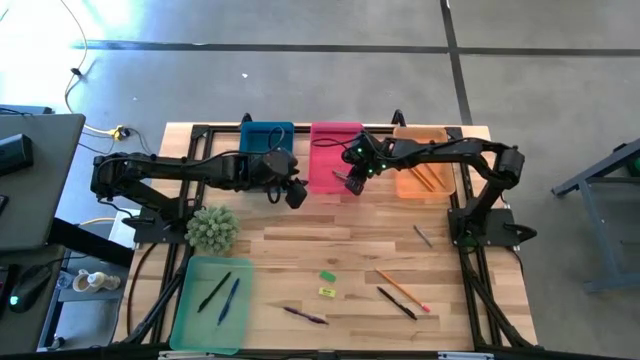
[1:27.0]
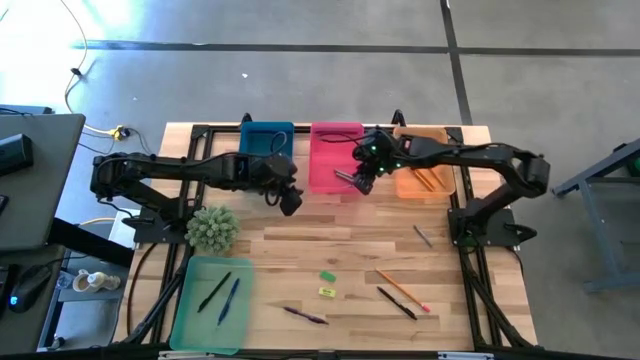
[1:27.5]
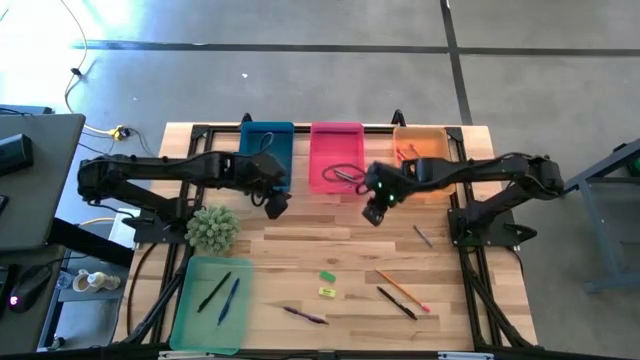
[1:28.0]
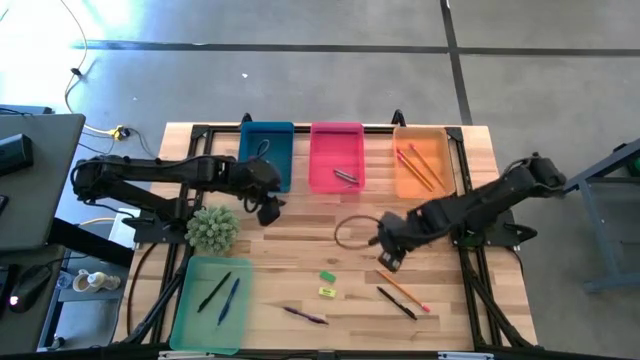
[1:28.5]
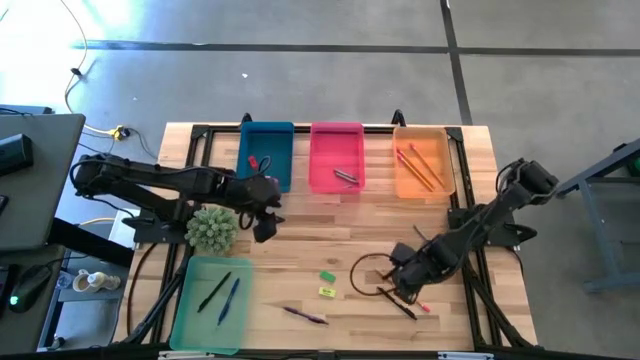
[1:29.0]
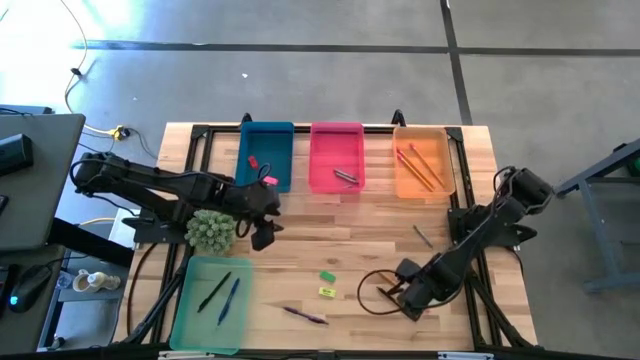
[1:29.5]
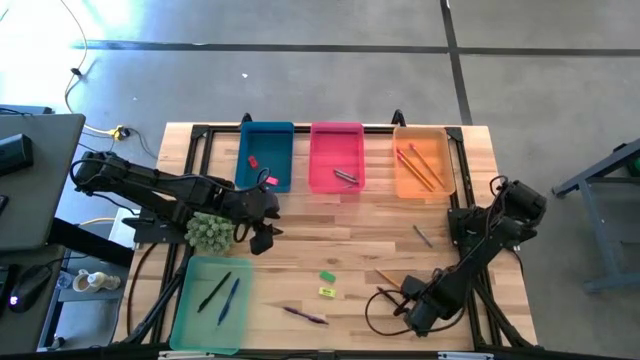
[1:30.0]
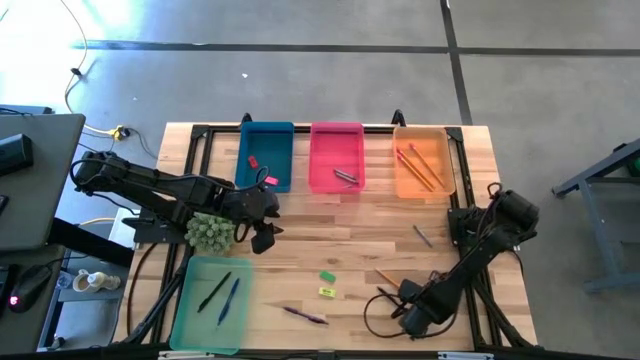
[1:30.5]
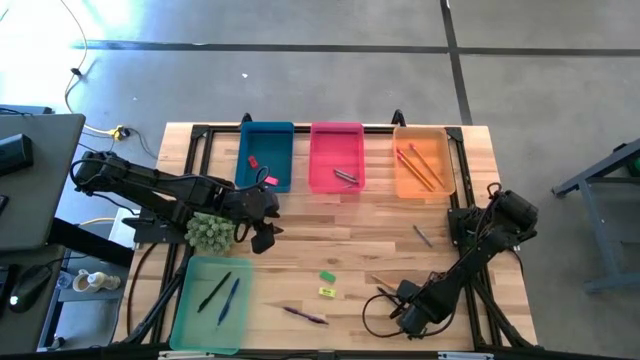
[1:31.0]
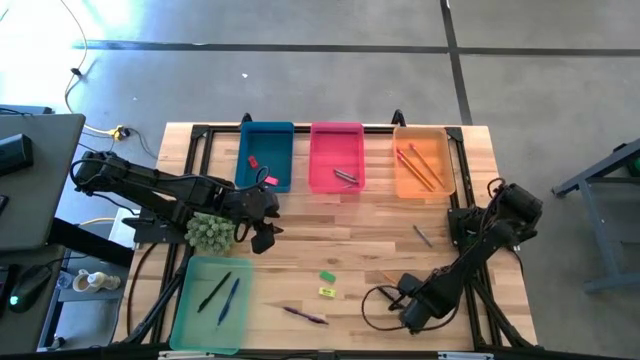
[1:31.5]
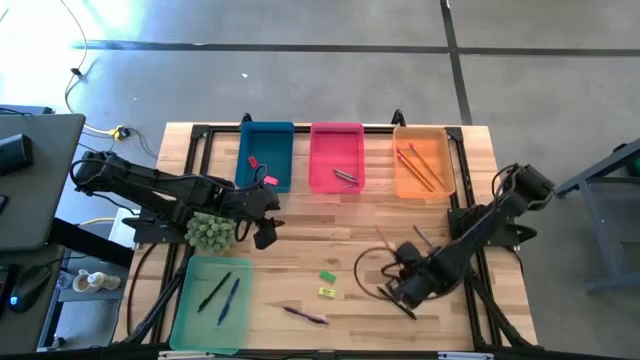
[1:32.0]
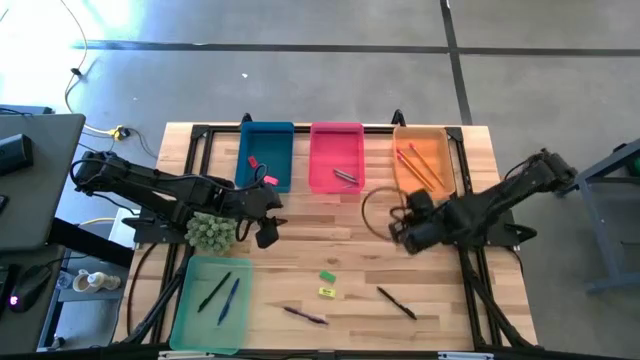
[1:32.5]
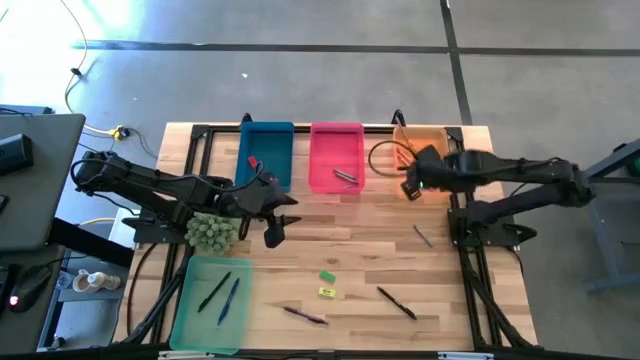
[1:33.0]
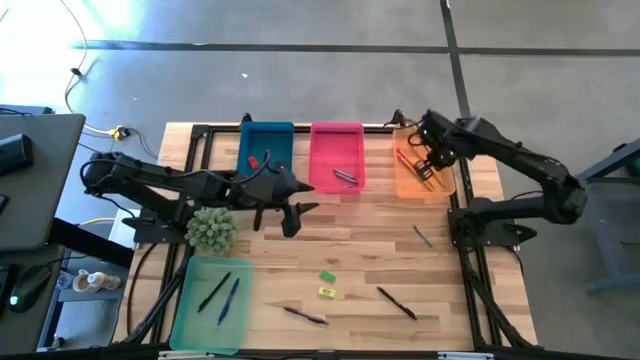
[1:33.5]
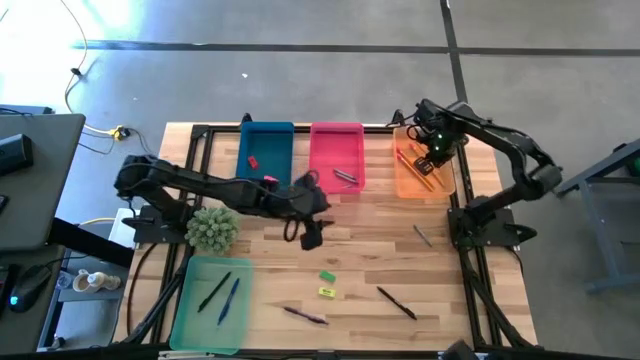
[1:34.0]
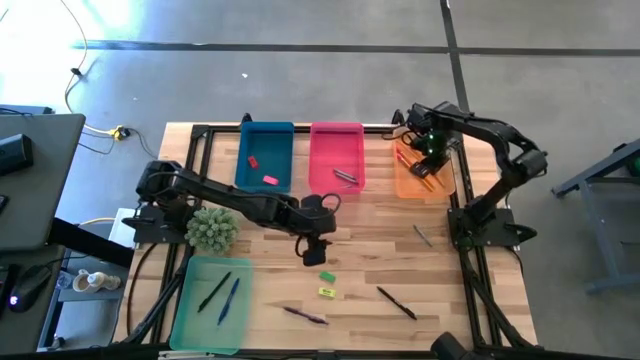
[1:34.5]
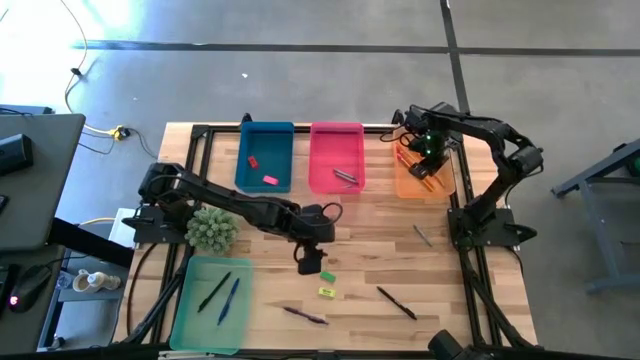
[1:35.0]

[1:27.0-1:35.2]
Task: Sort crayons/erasers/pens/pencils in bins
Put the pencil into the orange bin

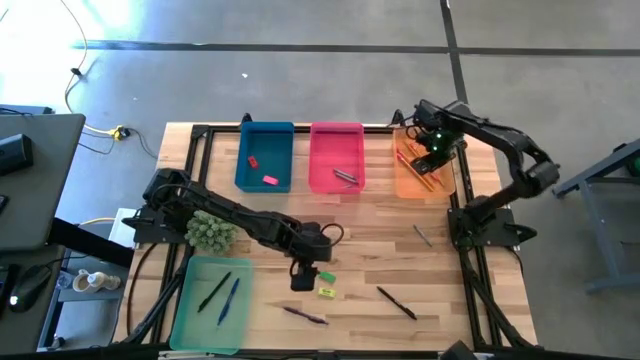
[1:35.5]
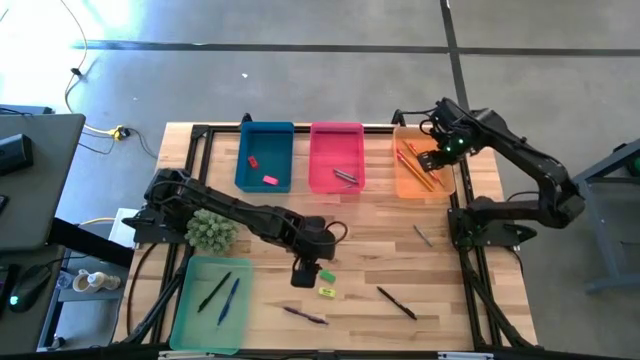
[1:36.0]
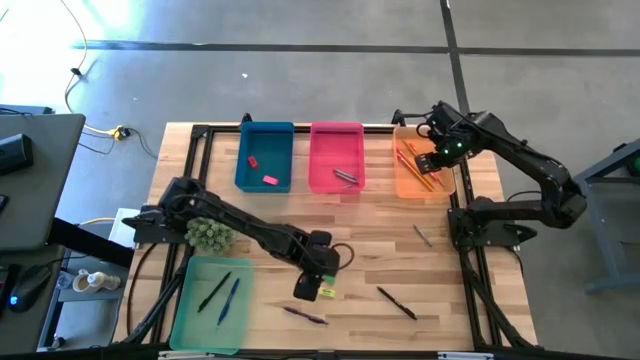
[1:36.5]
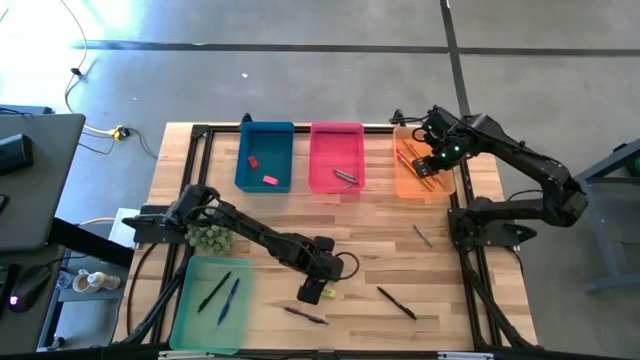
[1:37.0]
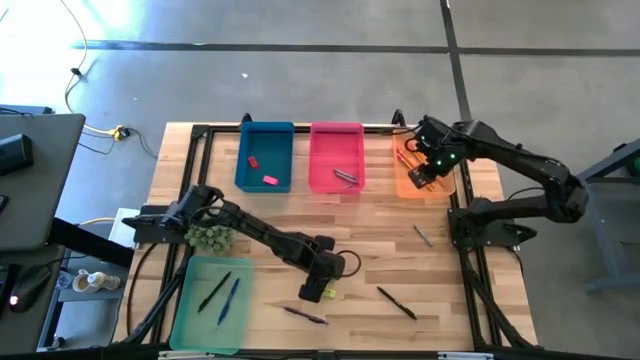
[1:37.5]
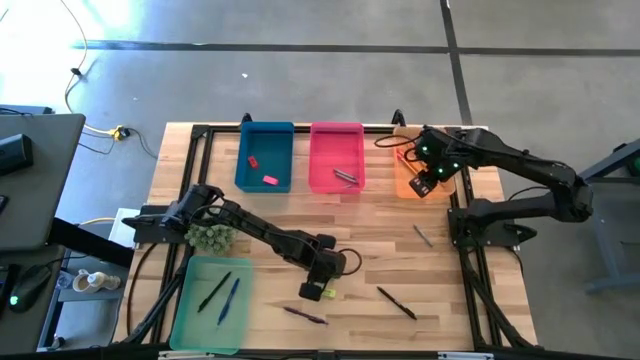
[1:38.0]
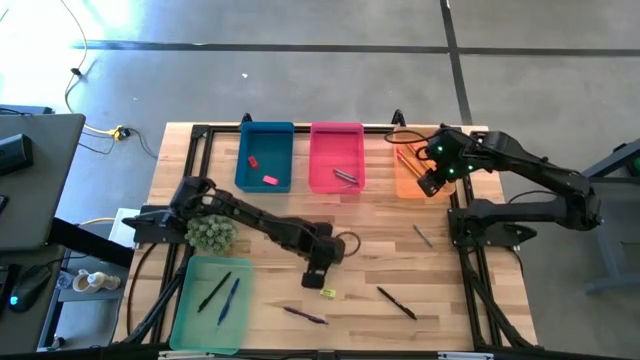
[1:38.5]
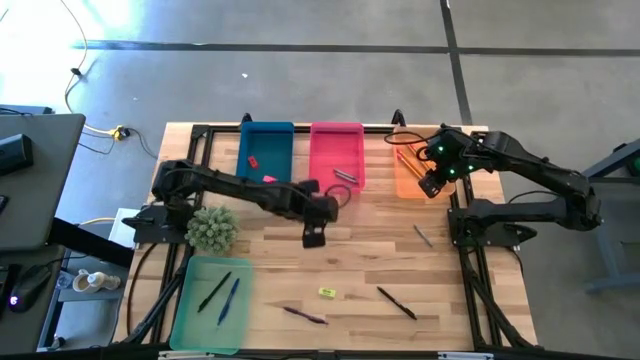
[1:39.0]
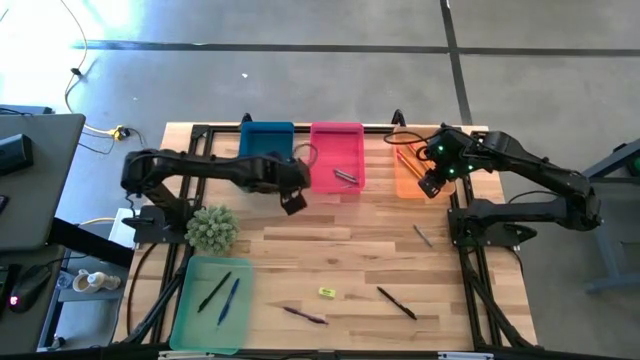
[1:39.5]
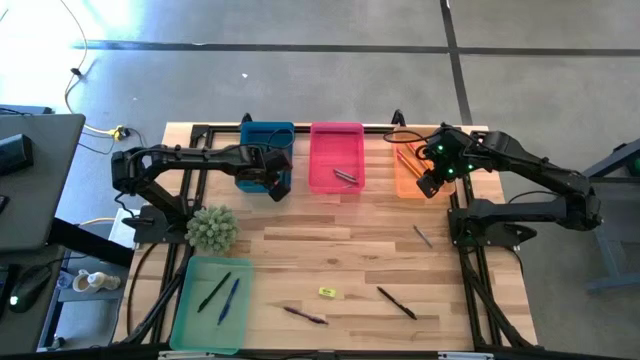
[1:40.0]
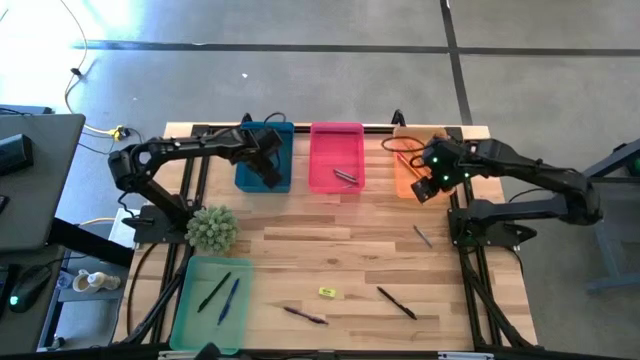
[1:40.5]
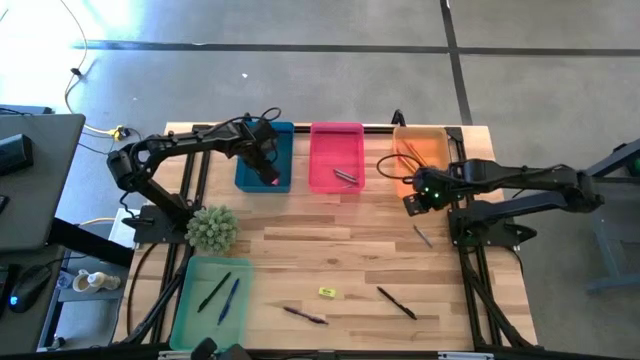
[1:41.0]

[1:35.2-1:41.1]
Put the green eraser into the blue bin

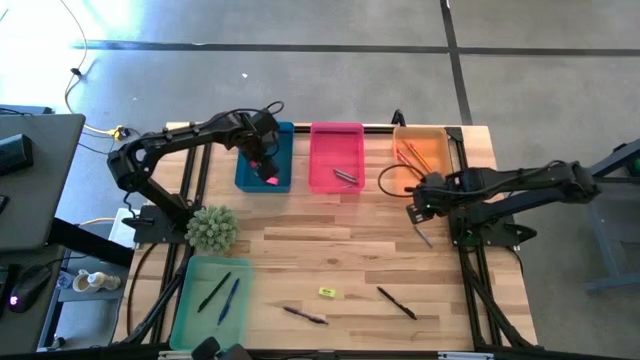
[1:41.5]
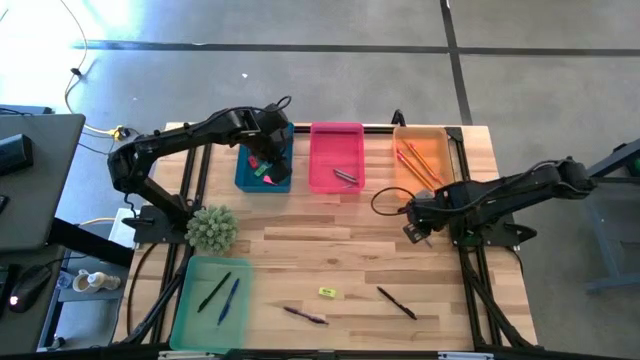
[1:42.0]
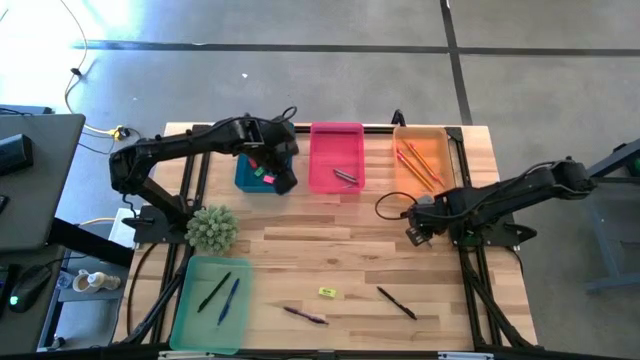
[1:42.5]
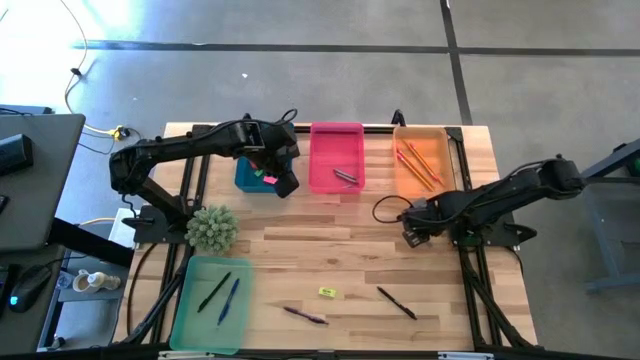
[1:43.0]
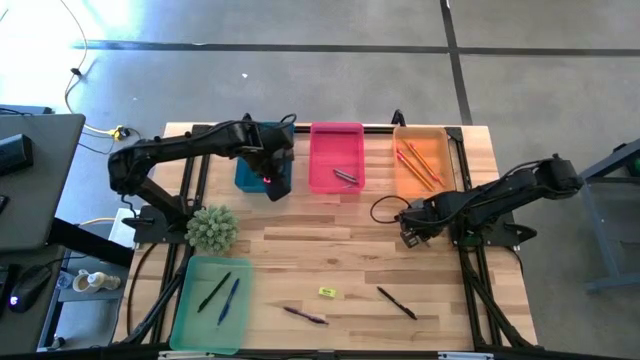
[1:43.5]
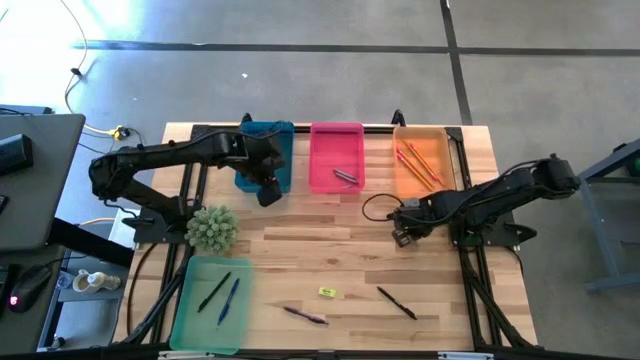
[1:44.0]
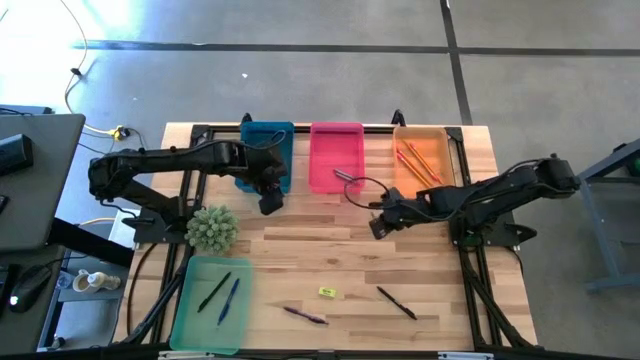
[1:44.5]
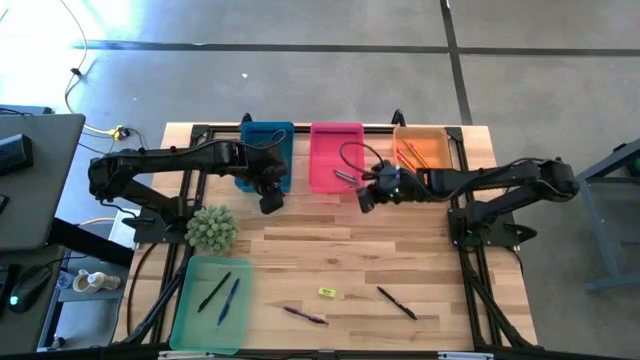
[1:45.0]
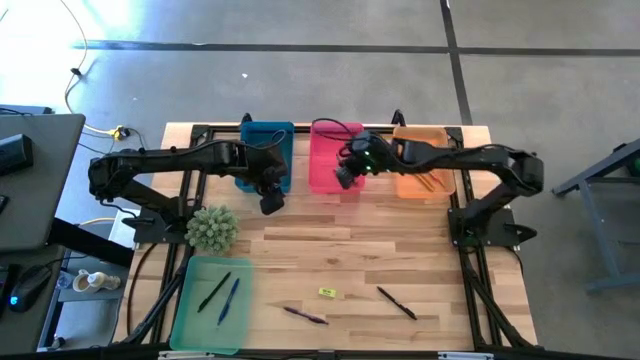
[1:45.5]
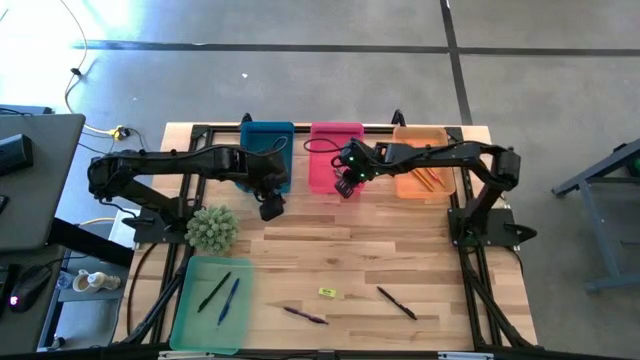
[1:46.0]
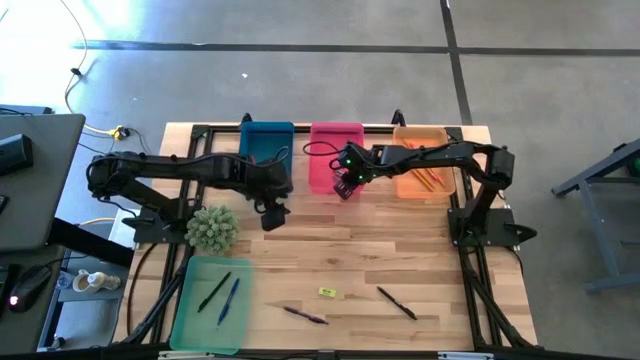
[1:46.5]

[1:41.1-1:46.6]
Put the gray crayon into the pink bin

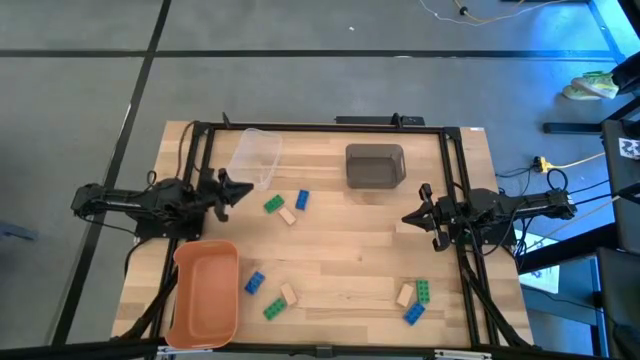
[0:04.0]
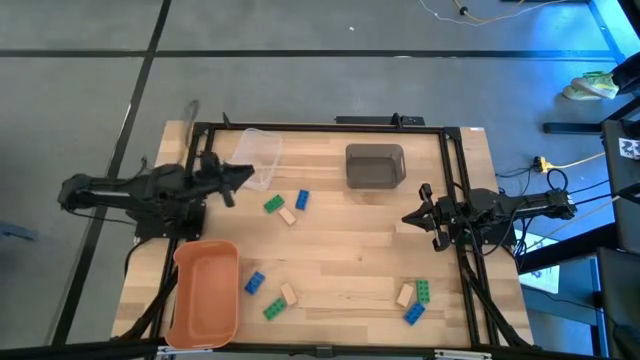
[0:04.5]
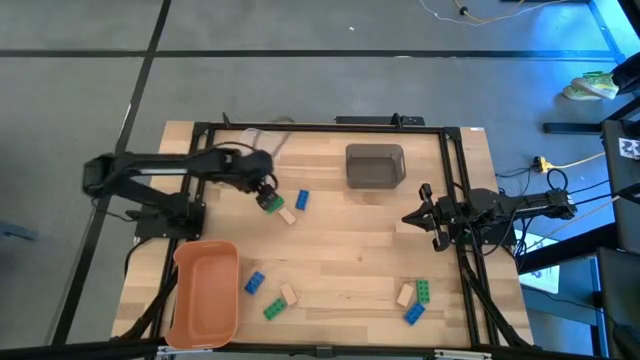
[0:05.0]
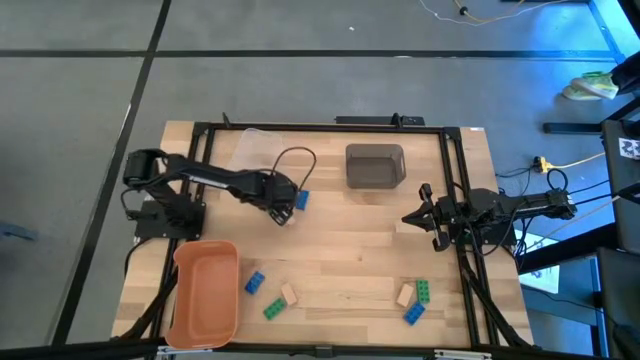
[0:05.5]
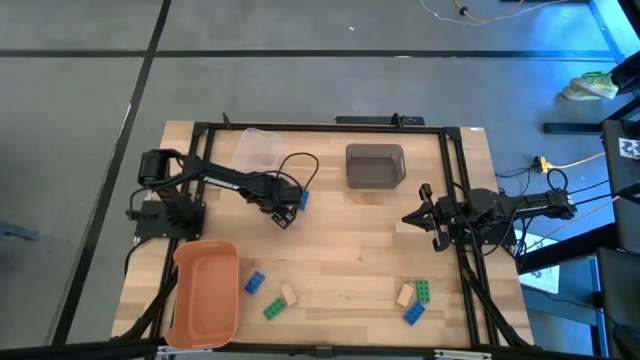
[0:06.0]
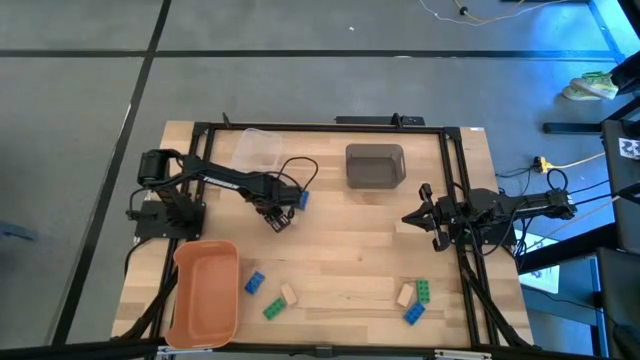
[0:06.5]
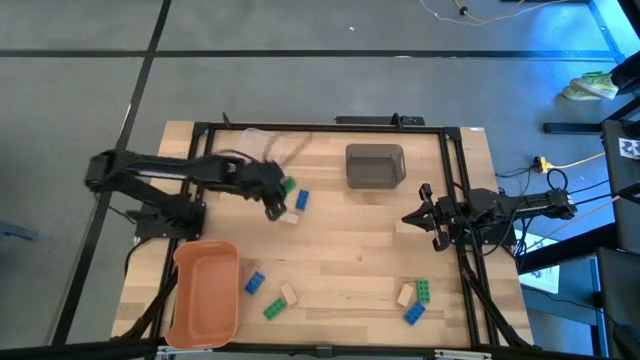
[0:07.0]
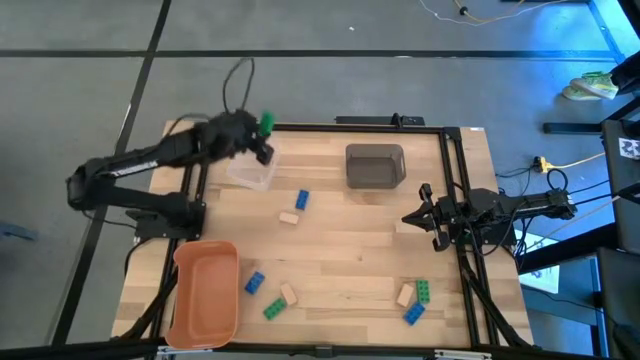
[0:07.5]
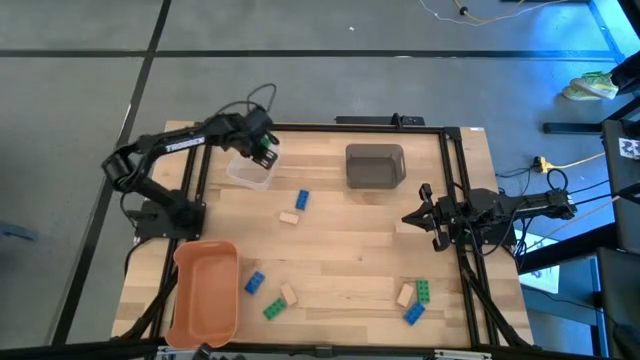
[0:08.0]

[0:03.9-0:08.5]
Task: Sort & place blocks by color
Put the top green game piece into the transparent bin
